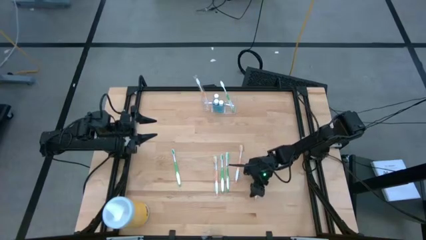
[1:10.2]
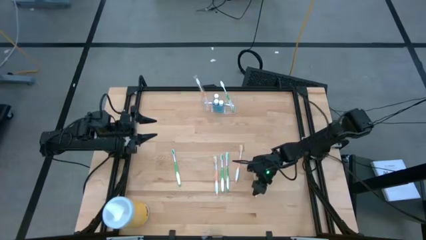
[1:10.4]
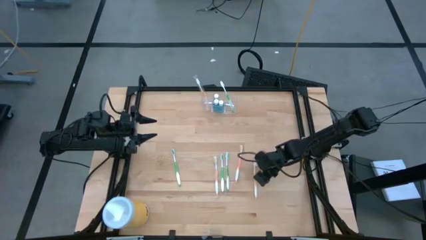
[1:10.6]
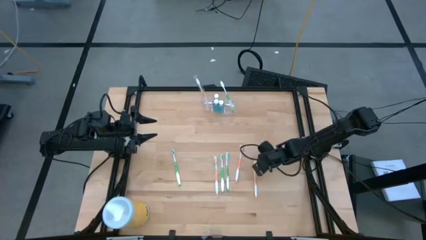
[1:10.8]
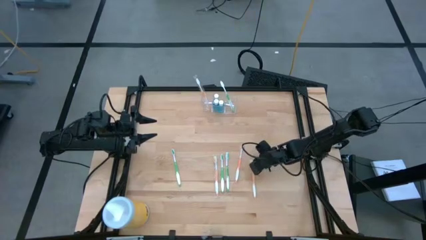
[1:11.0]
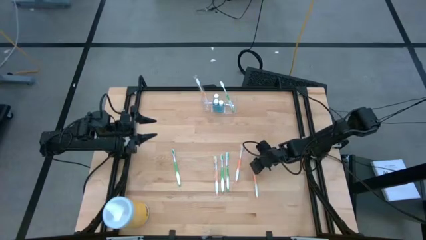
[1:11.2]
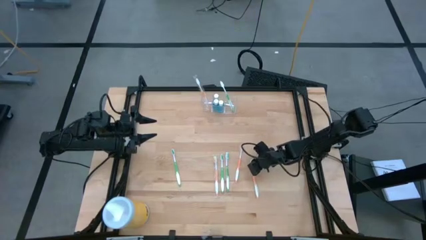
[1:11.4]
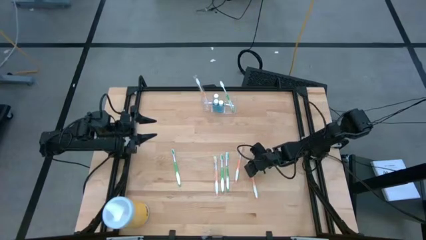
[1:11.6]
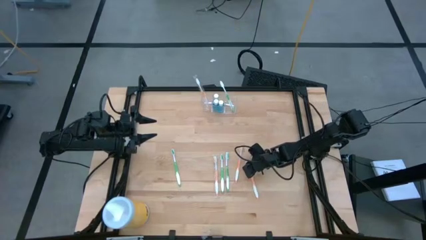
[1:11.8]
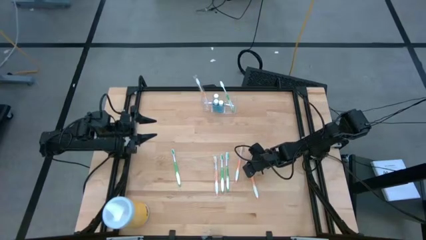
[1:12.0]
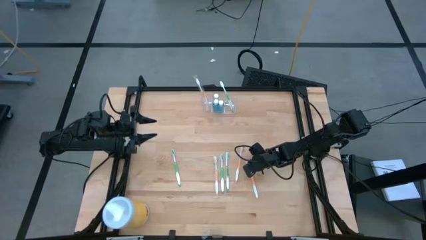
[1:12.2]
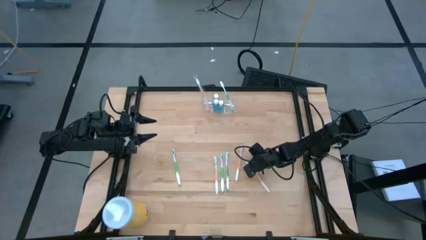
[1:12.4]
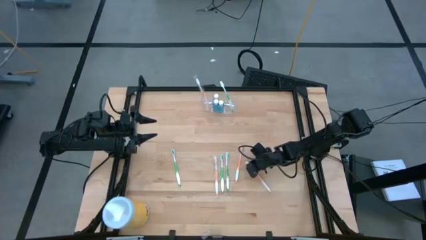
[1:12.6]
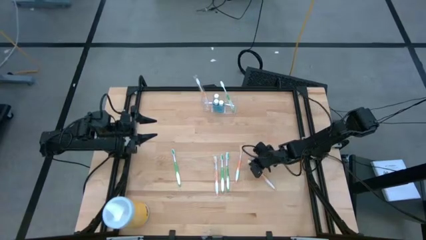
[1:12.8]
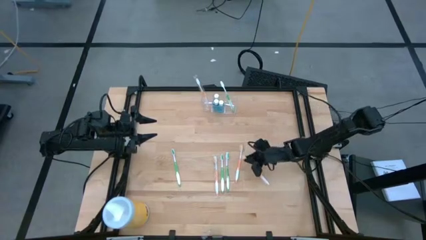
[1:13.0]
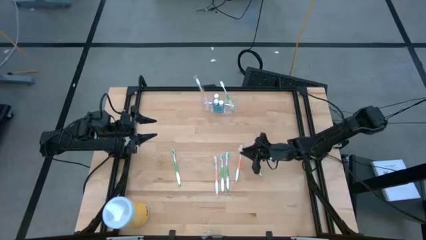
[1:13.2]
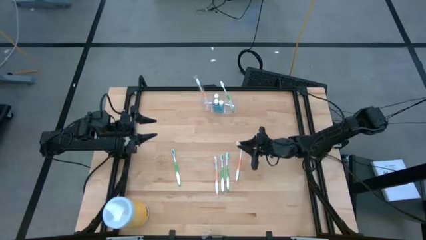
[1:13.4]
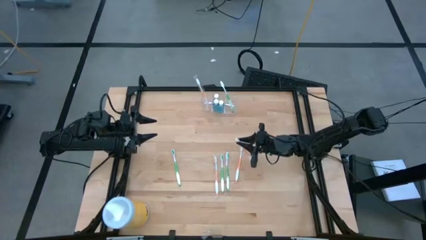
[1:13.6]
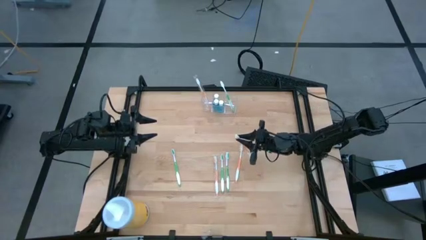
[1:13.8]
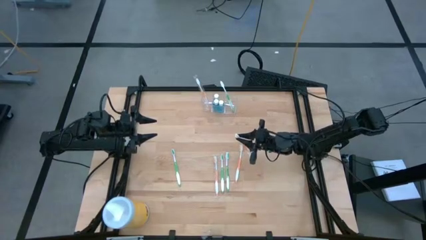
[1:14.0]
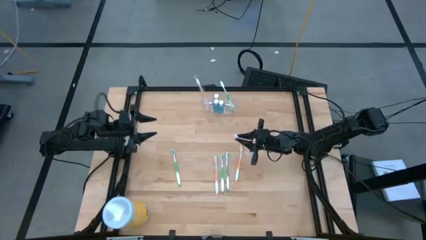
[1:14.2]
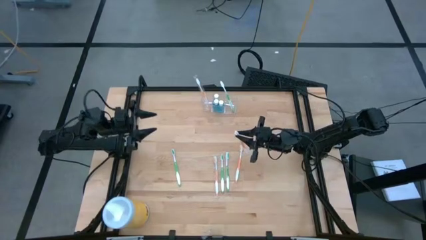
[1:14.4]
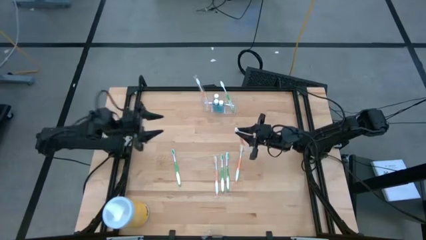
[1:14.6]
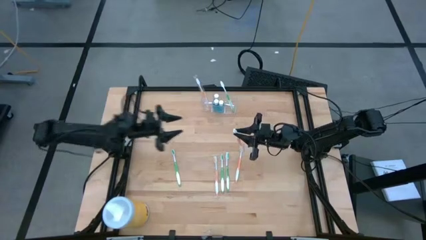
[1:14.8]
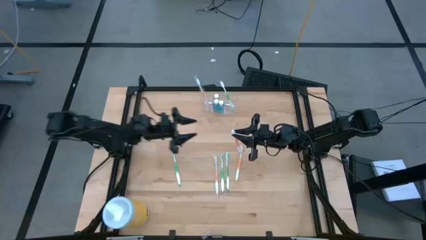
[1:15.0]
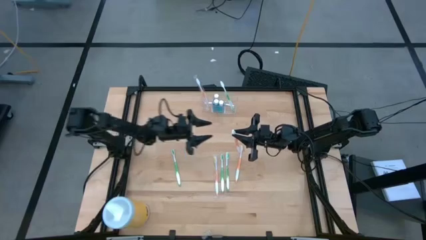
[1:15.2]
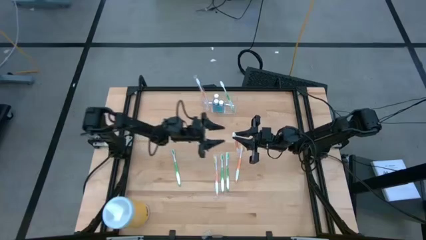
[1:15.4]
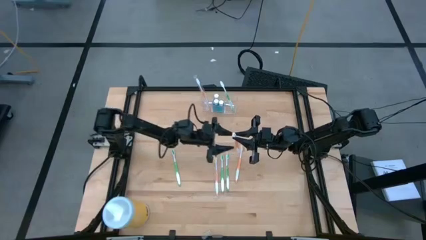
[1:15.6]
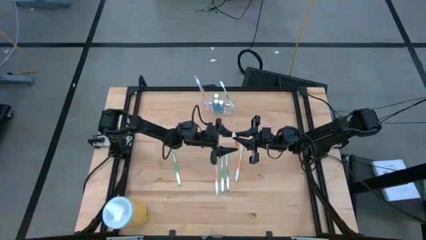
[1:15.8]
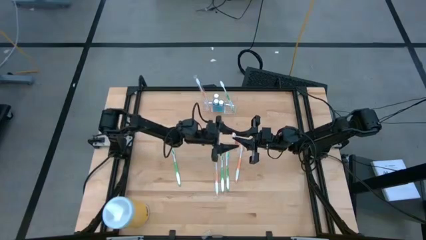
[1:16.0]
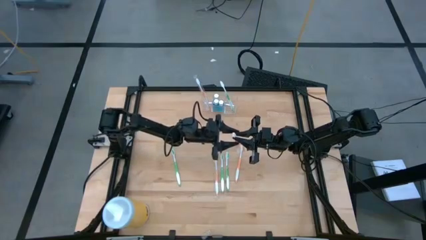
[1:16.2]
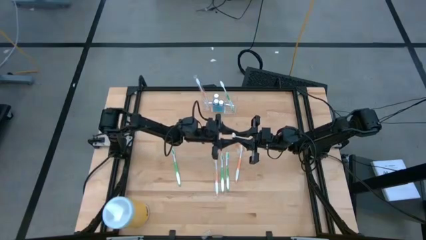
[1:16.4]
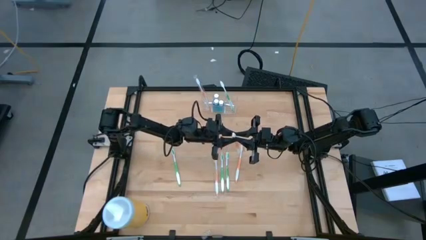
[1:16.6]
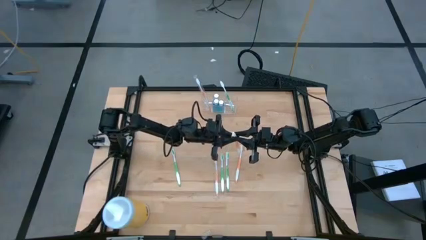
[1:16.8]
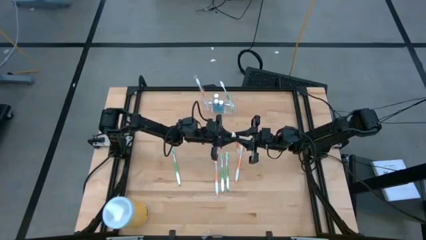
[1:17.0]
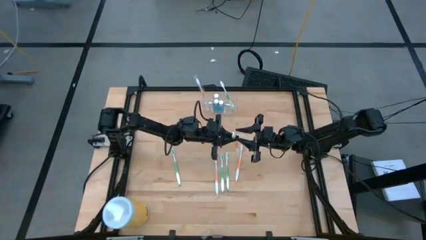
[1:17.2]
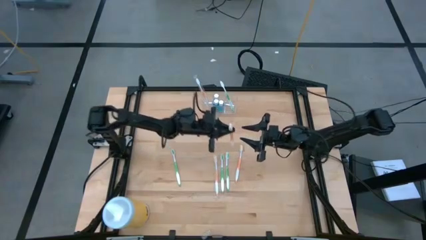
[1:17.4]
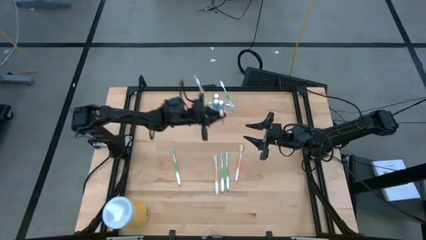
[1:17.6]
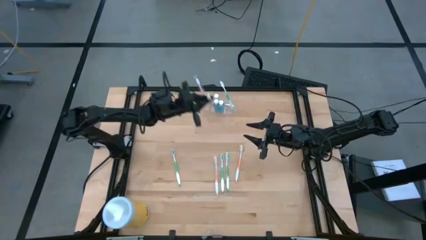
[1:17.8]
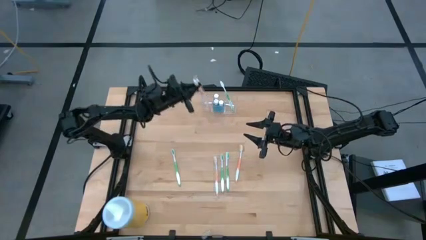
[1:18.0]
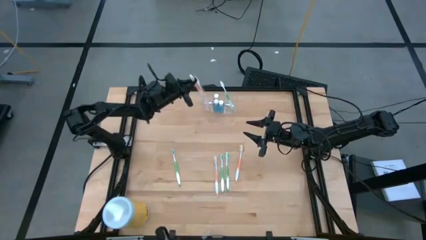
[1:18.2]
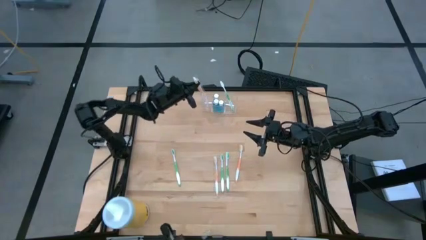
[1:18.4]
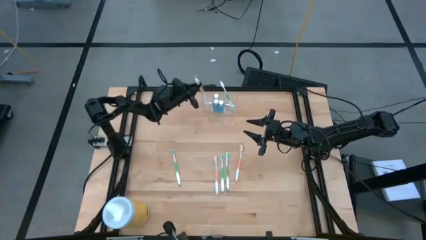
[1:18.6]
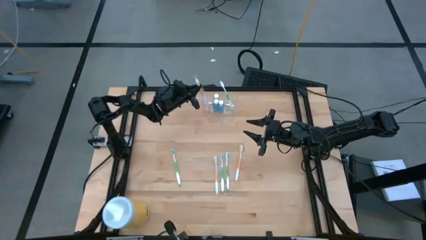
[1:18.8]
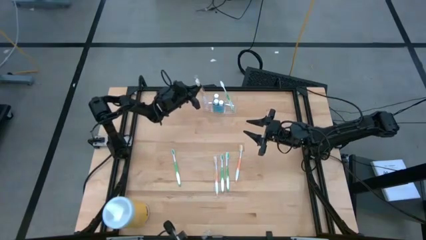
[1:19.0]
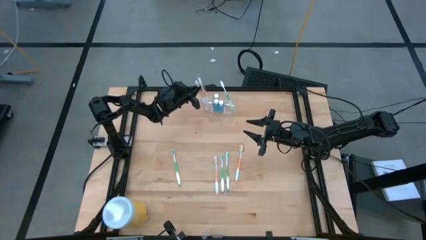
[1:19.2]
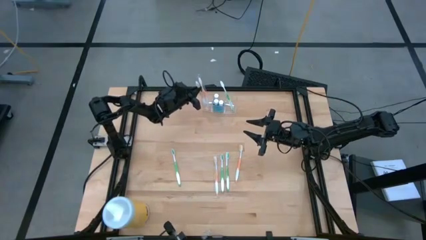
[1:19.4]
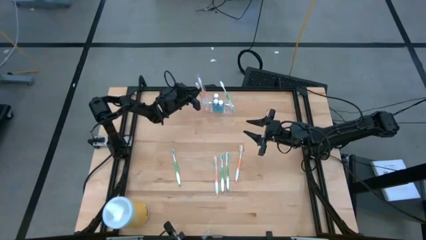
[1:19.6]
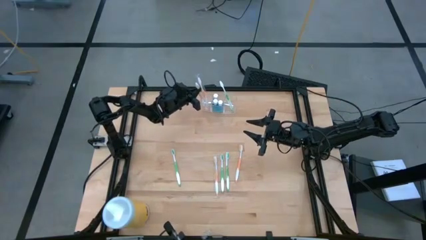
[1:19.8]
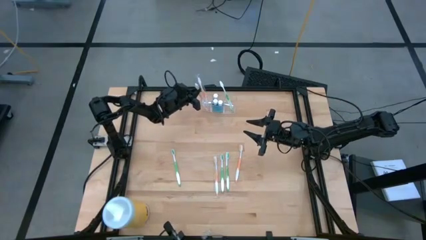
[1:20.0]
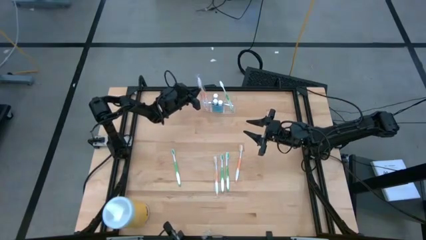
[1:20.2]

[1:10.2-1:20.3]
Task: Pick & Place toothbrushing station
Put the orange toothbrush into the transparent organizer

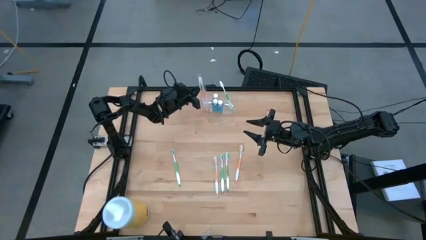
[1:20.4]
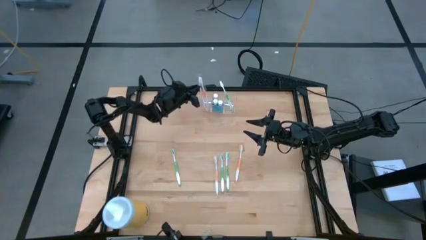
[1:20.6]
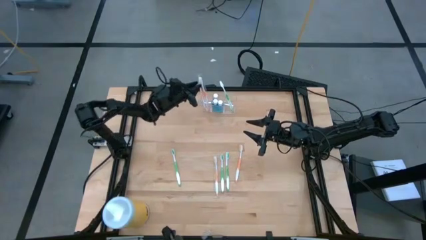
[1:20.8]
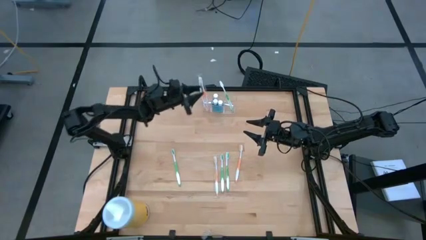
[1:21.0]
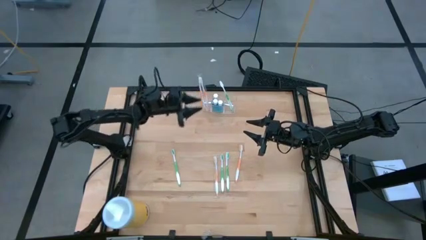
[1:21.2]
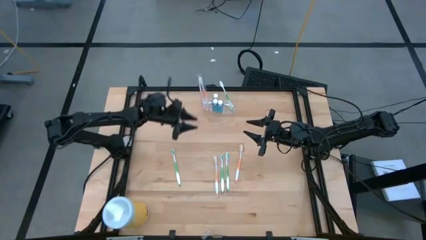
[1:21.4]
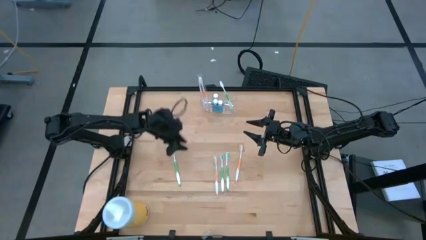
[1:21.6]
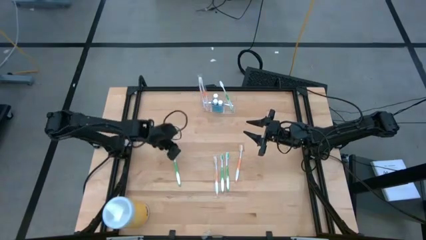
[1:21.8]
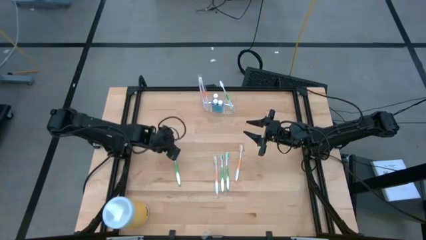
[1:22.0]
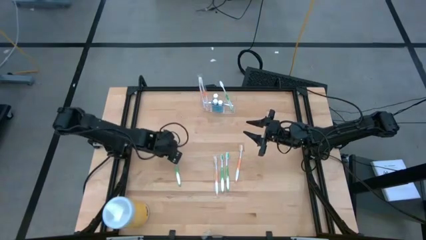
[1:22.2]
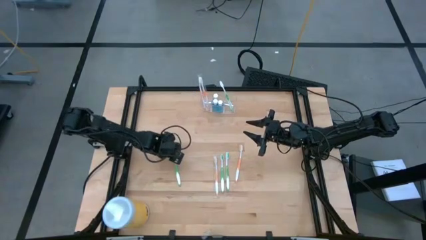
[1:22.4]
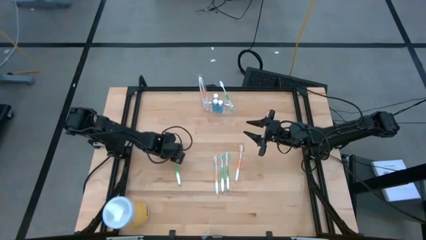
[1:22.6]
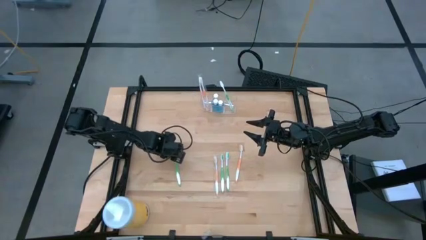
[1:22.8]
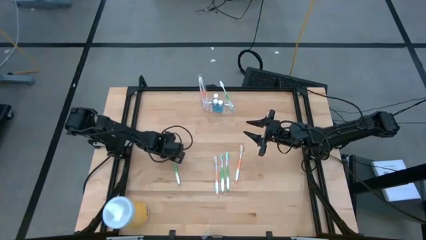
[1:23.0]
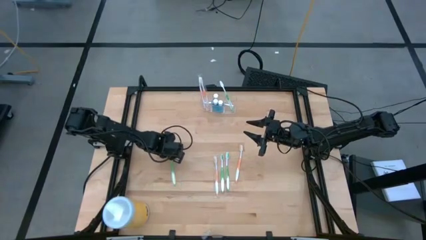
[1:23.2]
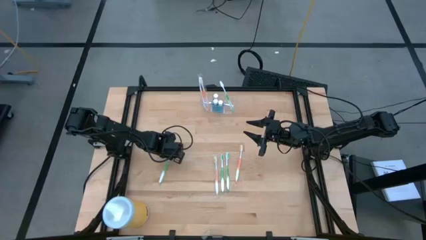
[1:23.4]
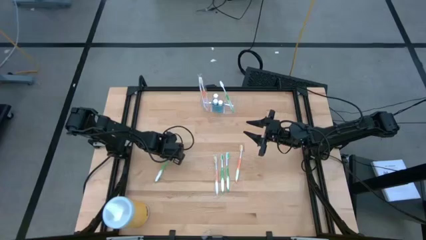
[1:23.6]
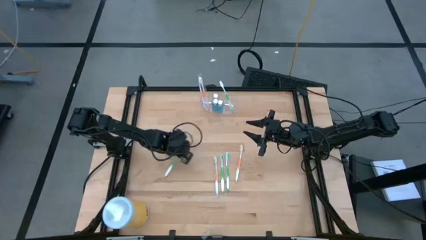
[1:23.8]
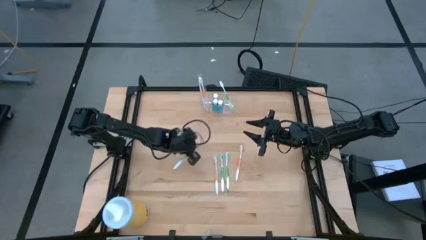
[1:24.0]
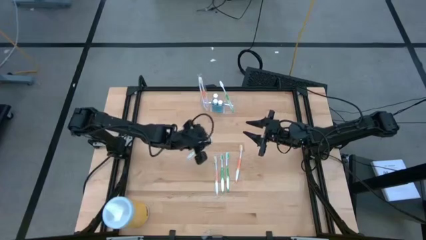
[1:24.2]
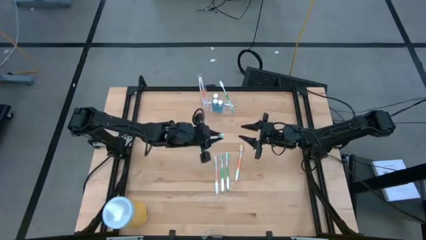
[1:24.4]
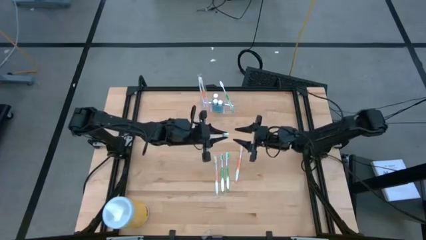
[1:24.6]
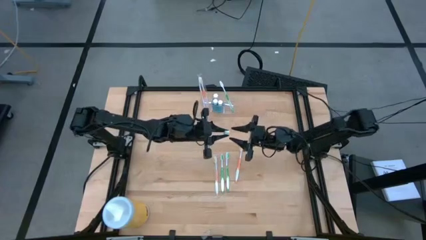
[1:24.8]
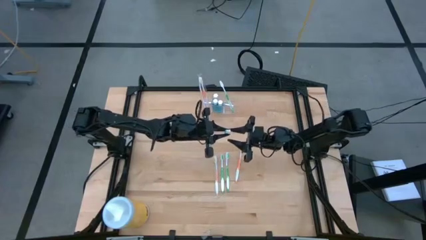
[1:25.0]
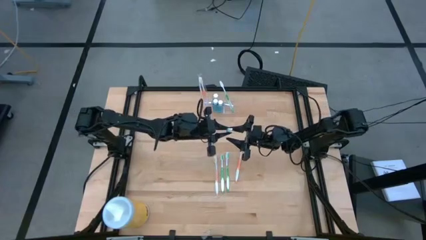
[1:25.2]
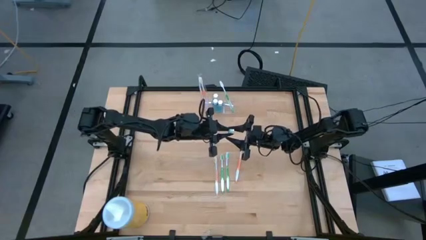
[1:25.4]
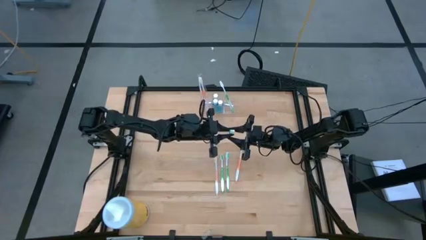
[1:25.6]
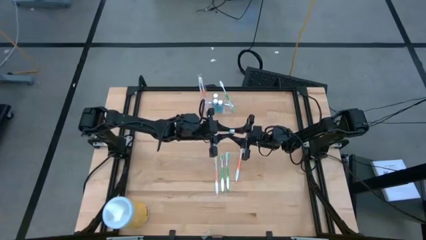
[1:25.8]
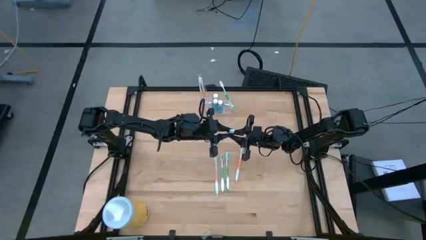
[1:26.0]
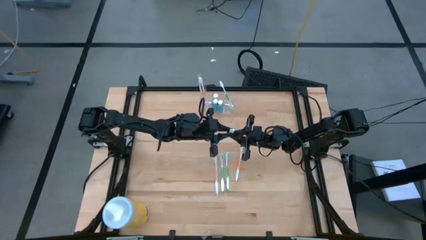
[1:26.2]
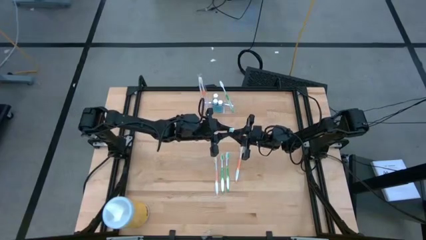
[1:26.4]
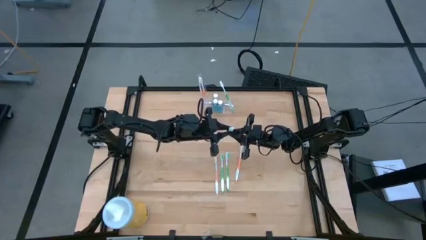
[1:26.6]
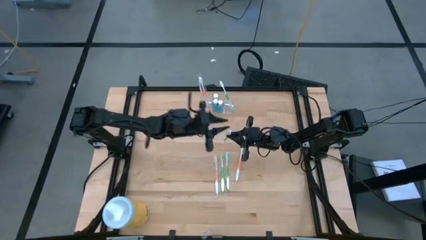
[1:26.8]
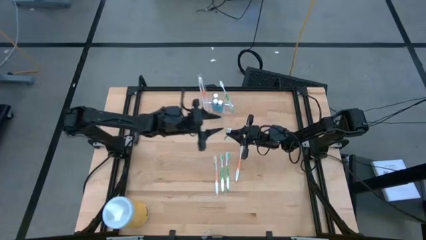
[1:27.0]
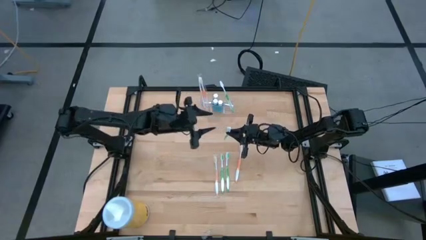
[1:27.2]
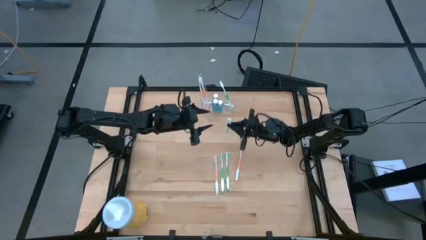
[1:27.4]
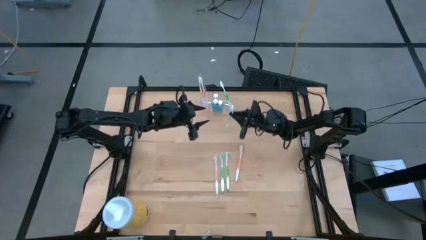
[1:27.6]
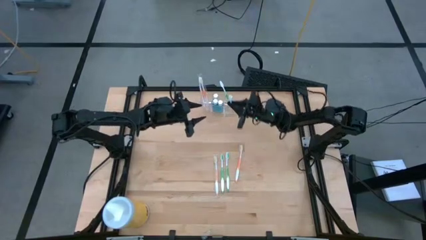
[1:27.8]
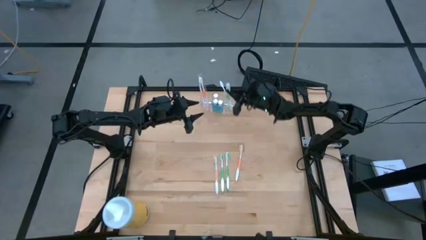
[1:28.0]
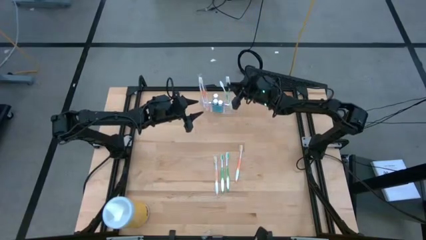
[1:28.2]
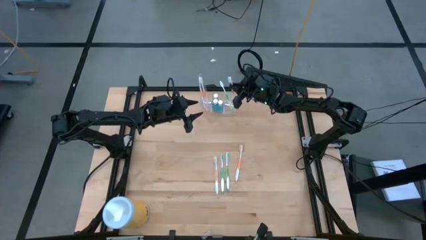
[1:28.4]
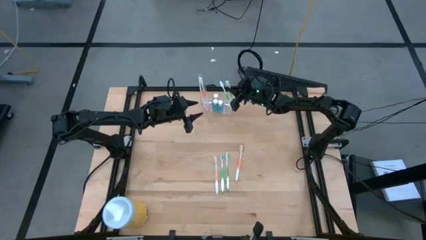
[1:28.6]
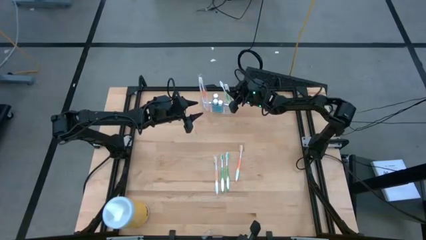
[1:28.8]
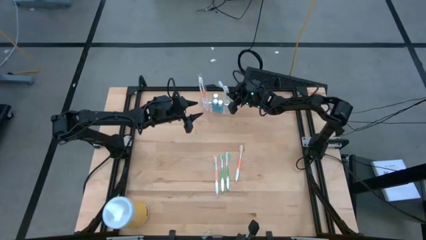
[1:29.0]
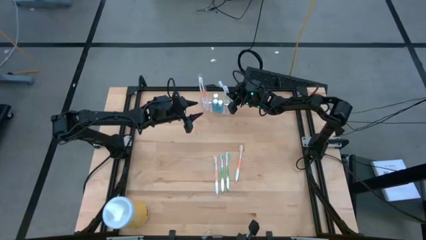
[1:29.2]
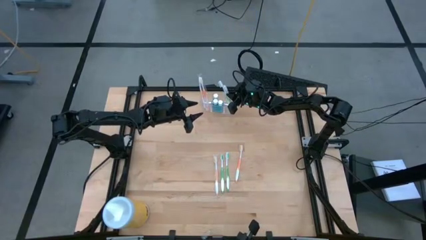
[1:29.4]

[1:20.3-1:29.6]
Put the green toothbrush into the transparent organizer
